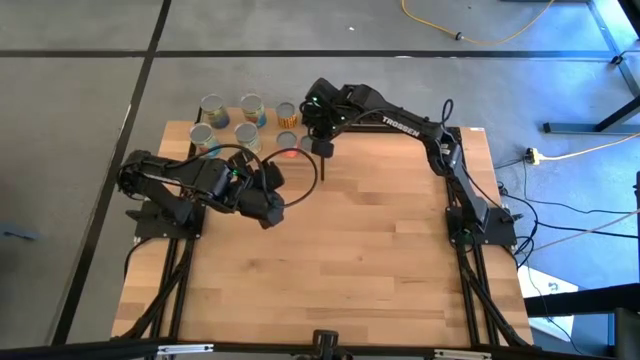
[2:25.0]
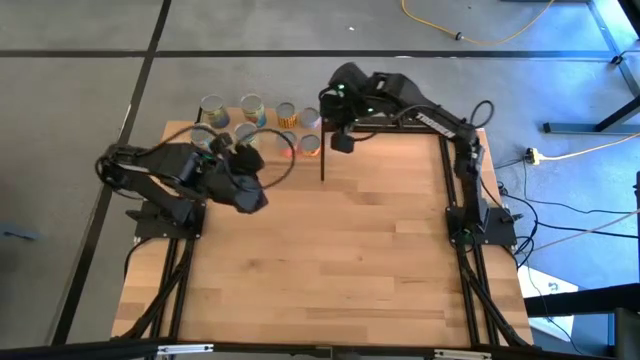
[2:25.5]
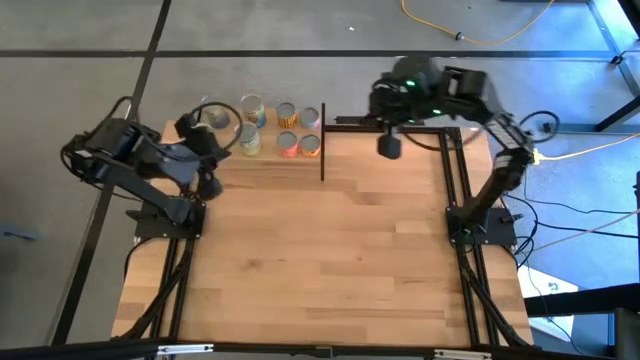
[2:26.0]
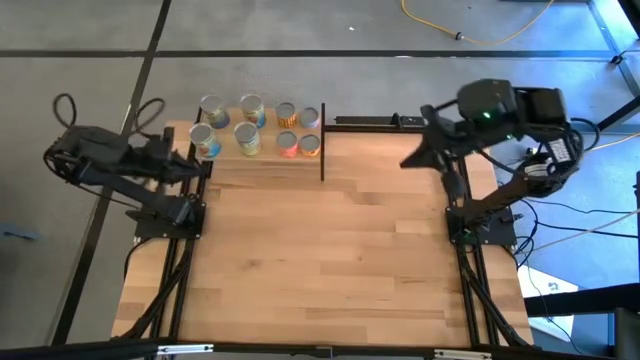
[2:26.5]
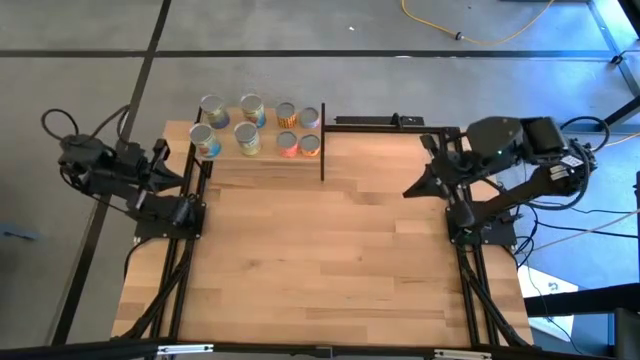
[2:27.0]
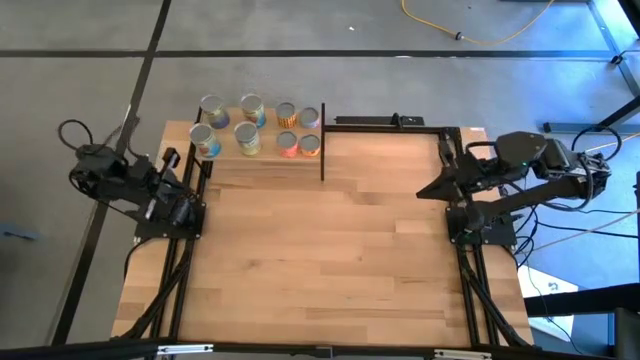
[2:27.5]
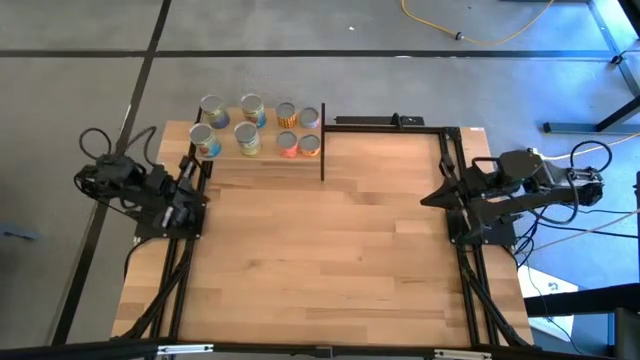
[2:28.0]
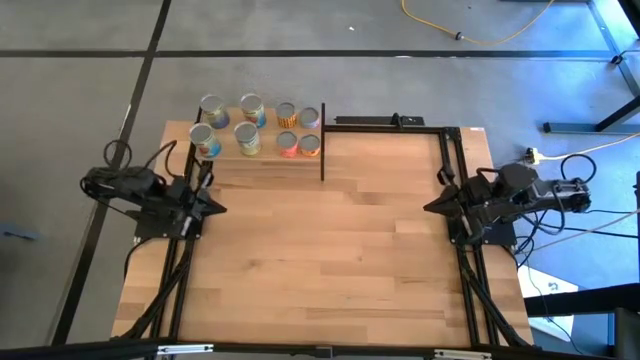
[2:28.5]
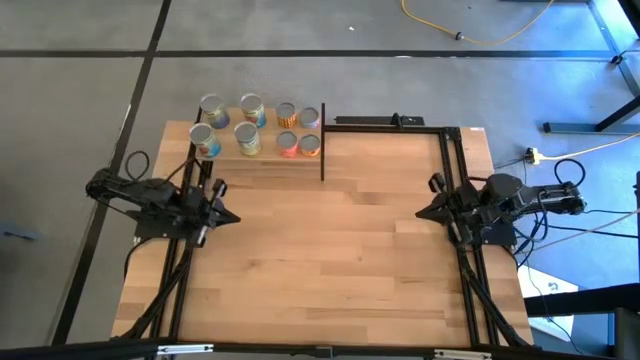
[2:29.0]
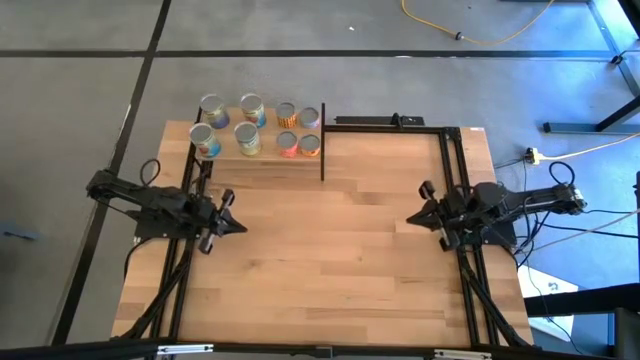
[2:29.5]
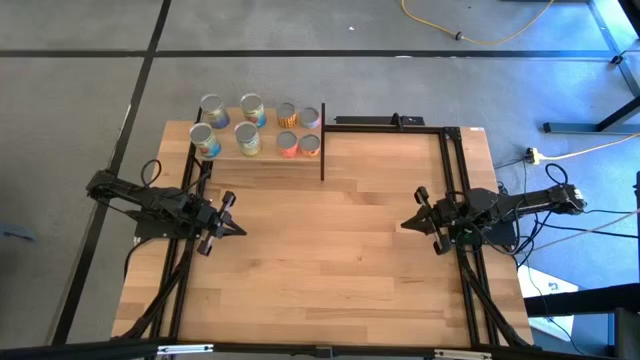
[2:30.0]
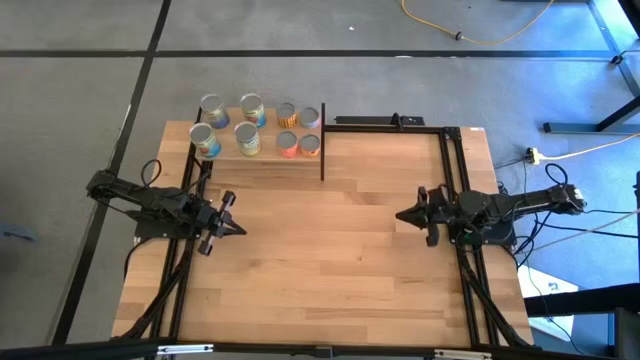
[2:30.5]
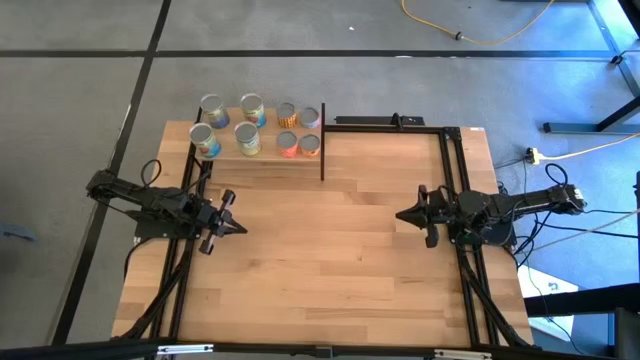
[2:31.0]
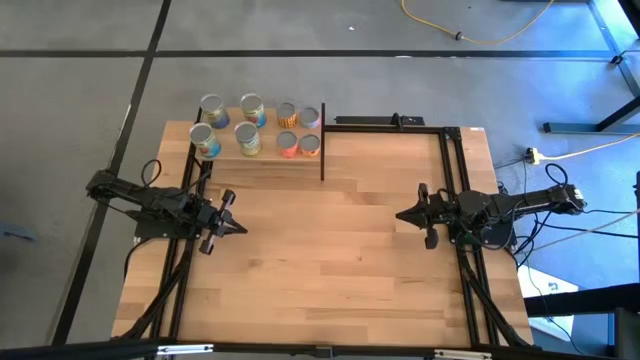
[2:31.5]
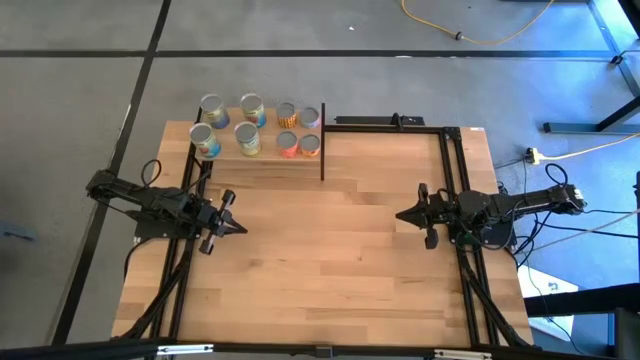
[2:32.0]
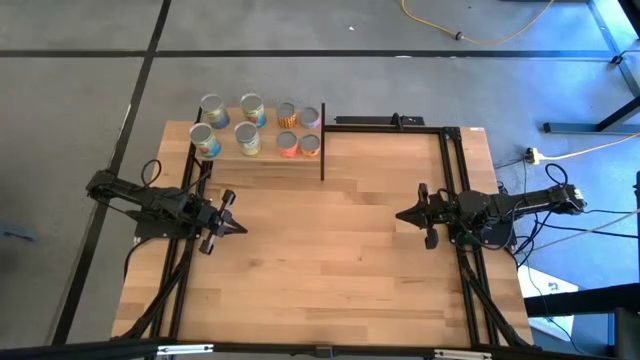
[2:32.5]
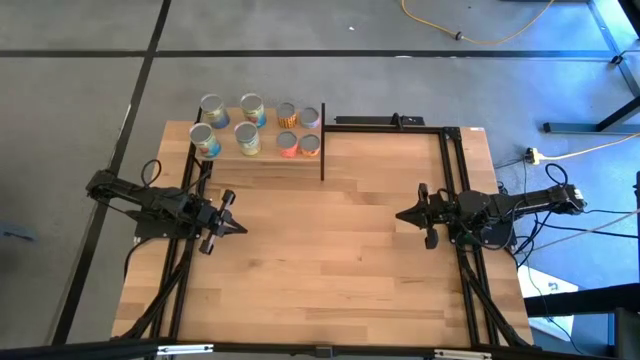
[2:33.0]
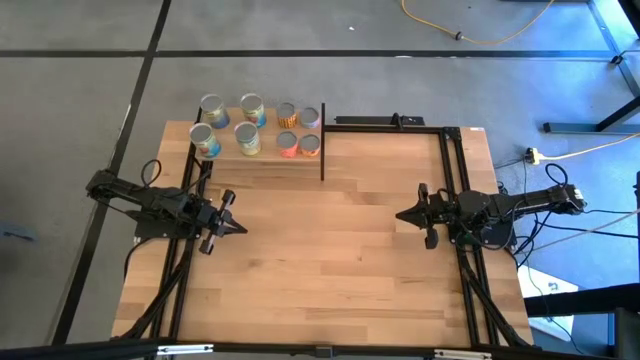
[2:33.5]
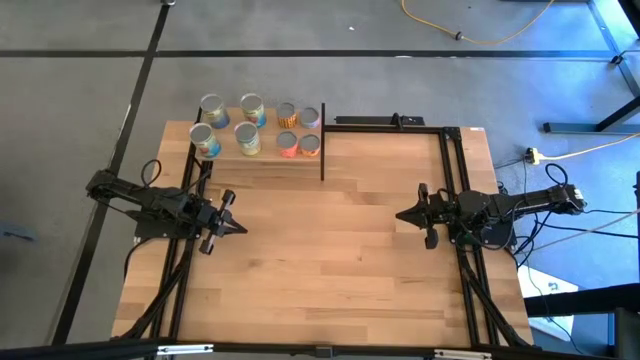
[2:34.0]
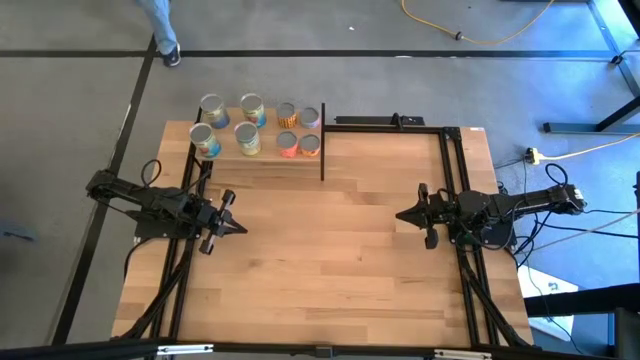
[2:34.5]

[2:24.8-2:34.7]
Task: Pick and place cans onto a shelf
Return to Home Position

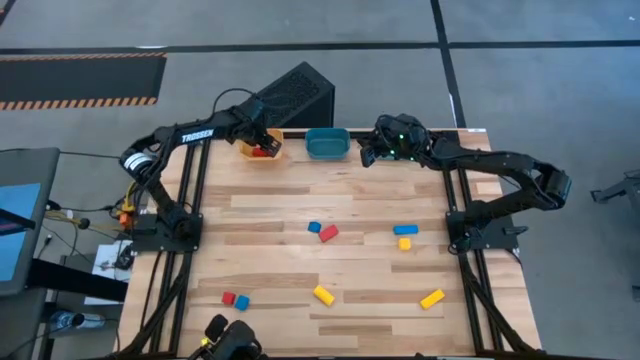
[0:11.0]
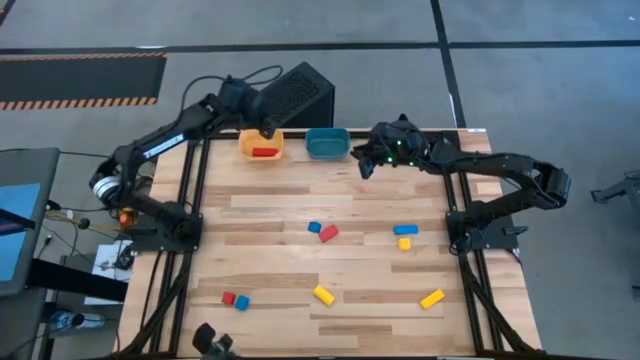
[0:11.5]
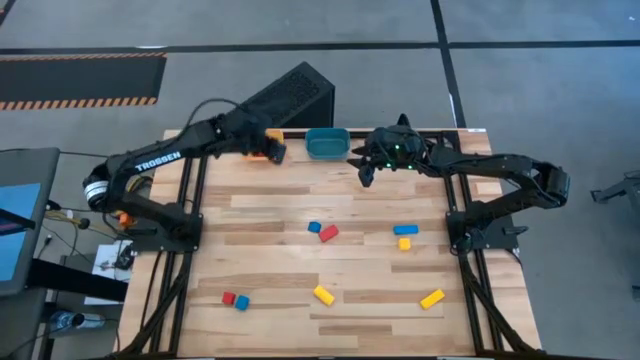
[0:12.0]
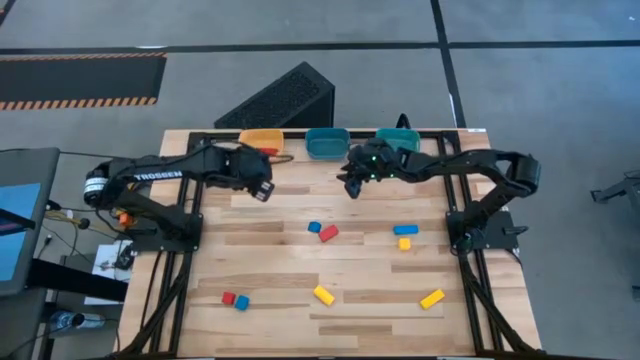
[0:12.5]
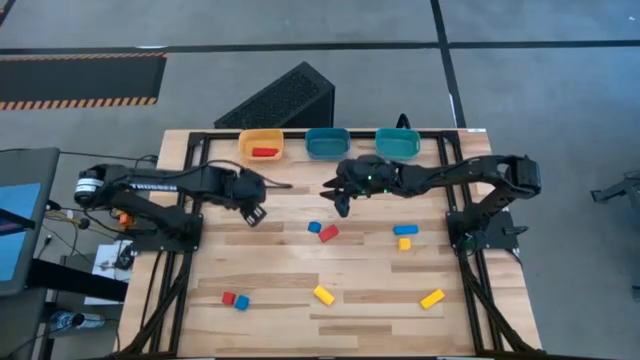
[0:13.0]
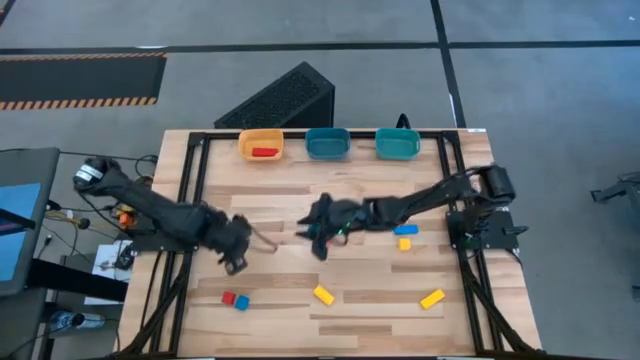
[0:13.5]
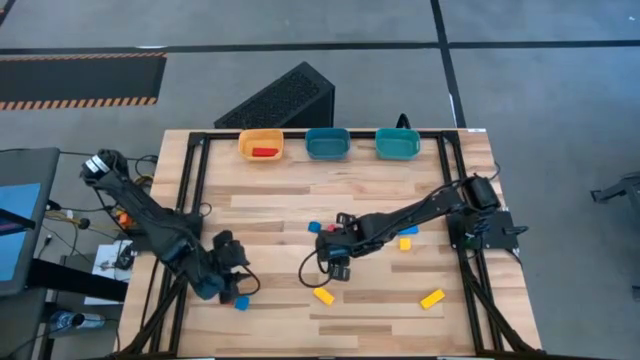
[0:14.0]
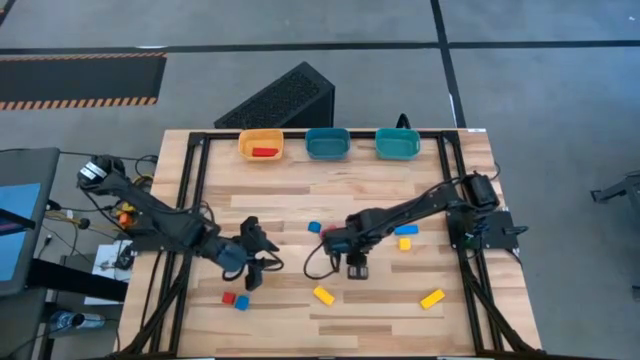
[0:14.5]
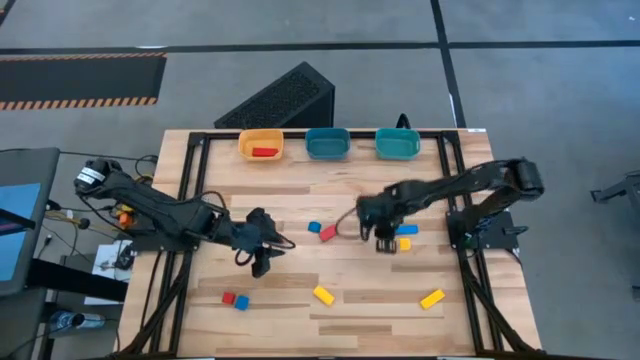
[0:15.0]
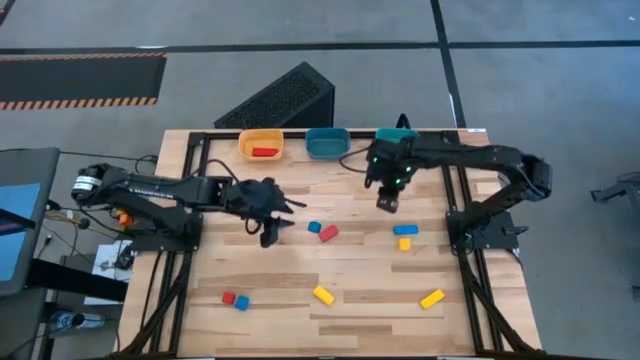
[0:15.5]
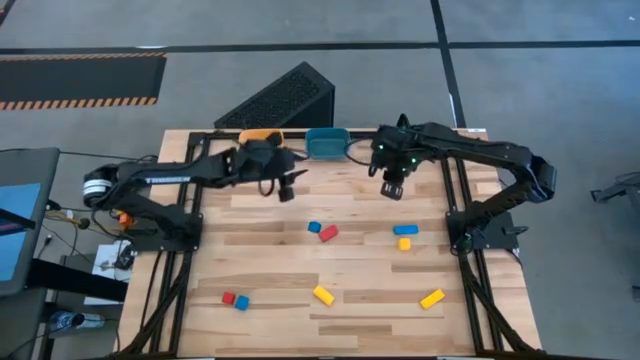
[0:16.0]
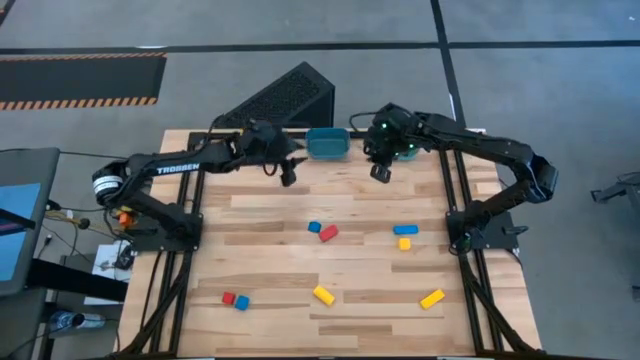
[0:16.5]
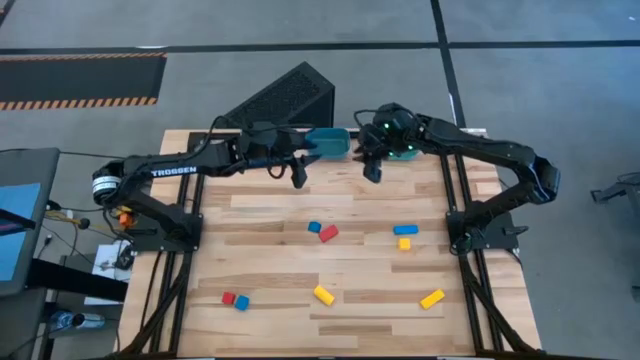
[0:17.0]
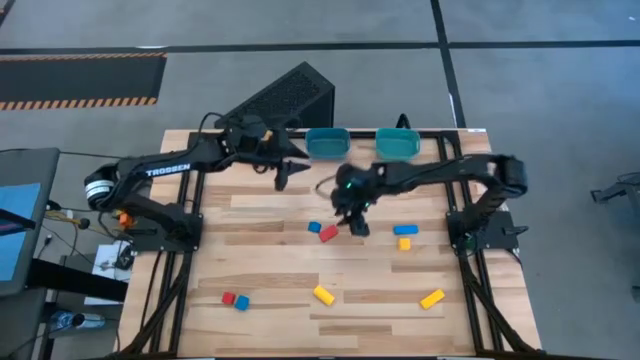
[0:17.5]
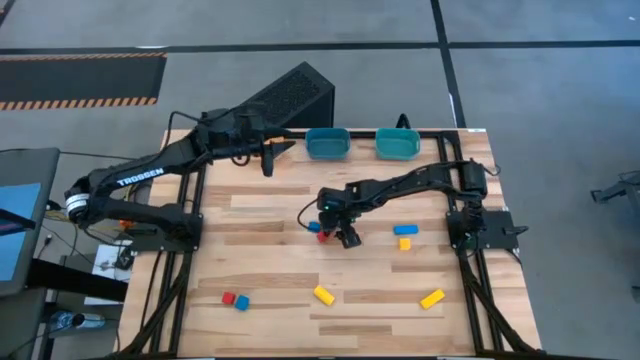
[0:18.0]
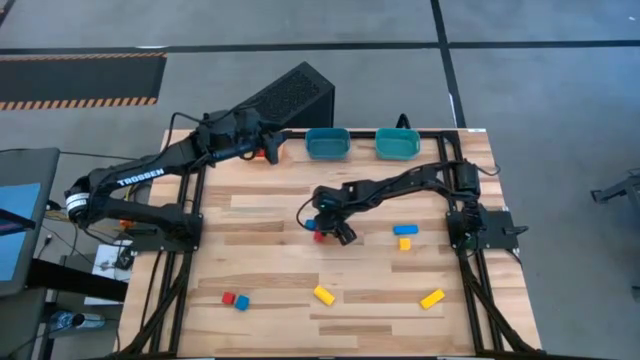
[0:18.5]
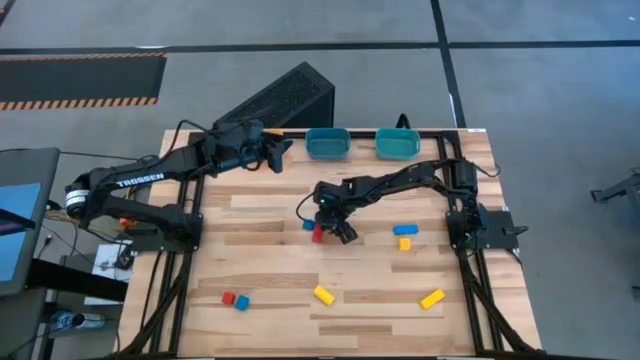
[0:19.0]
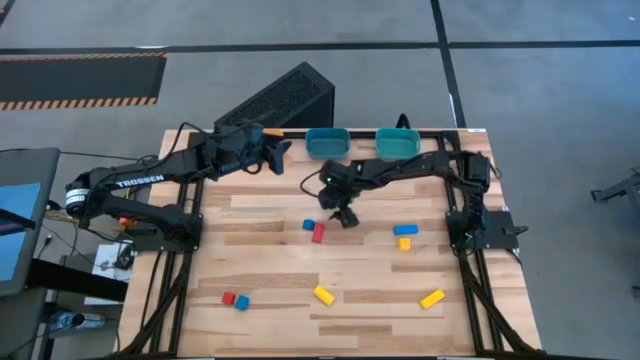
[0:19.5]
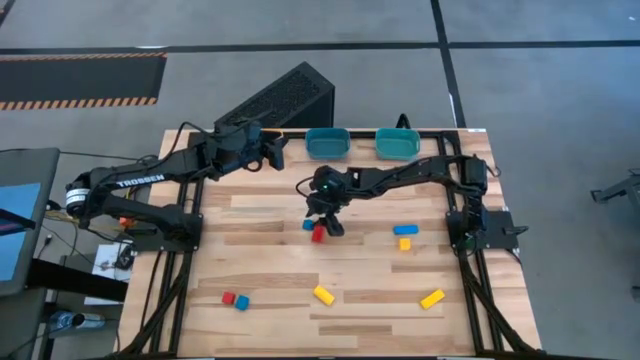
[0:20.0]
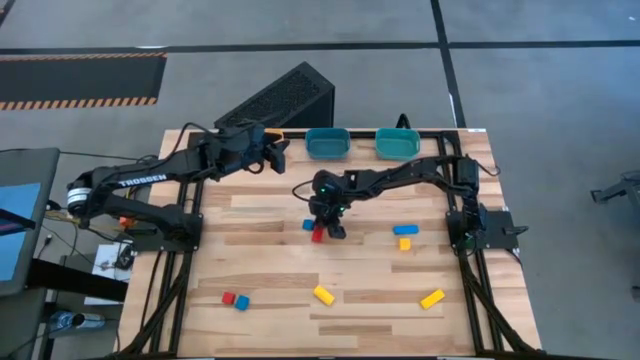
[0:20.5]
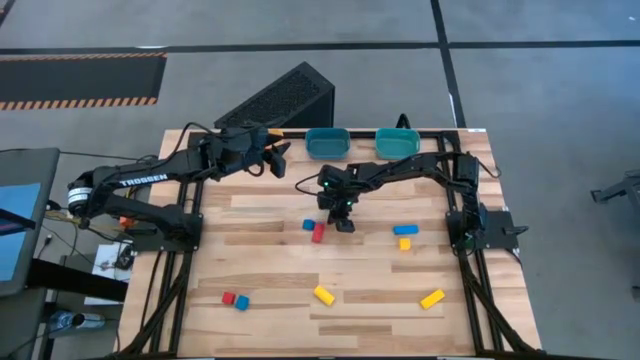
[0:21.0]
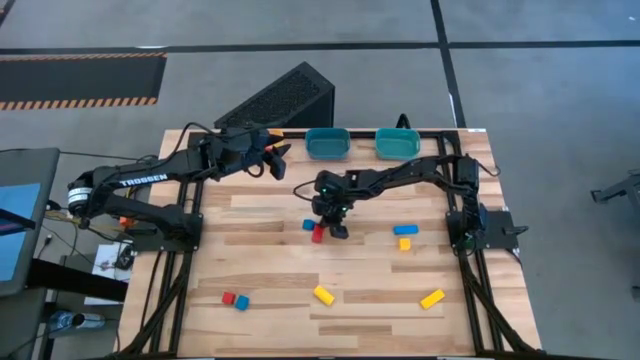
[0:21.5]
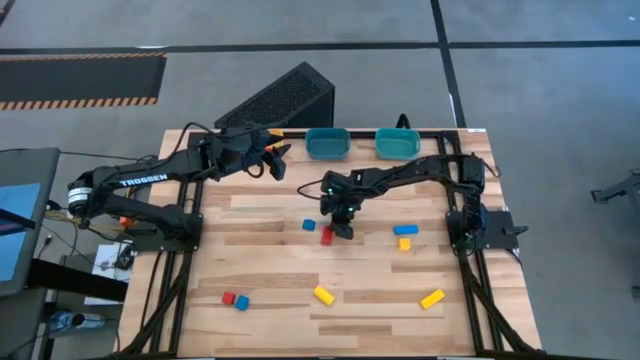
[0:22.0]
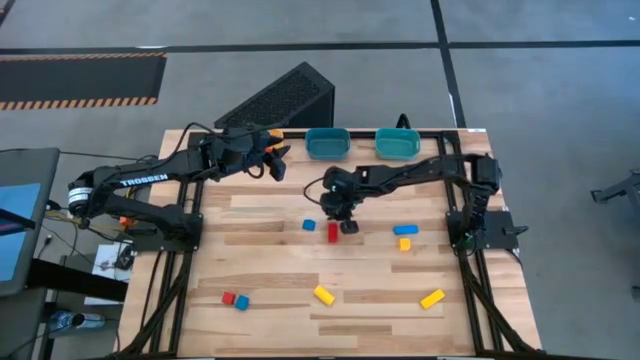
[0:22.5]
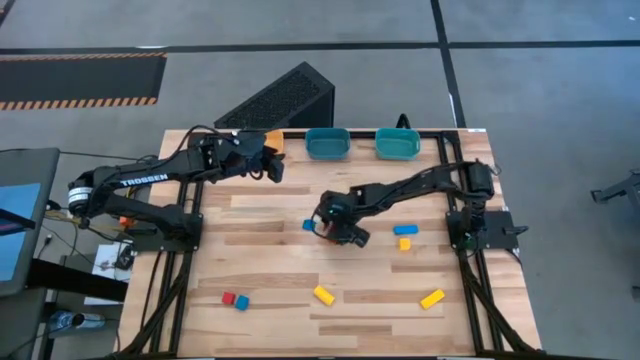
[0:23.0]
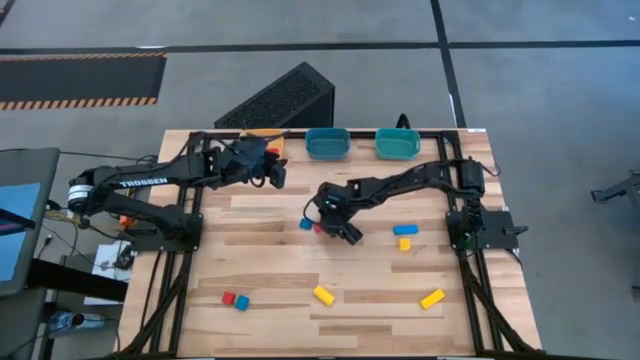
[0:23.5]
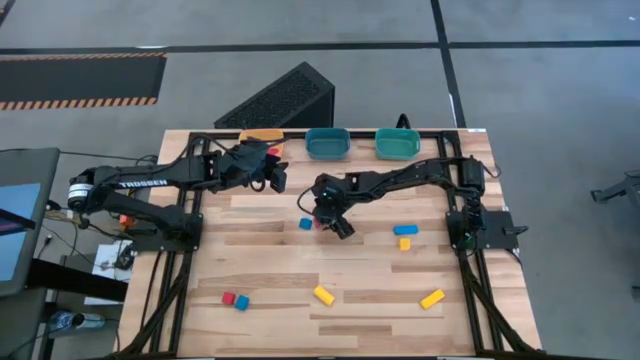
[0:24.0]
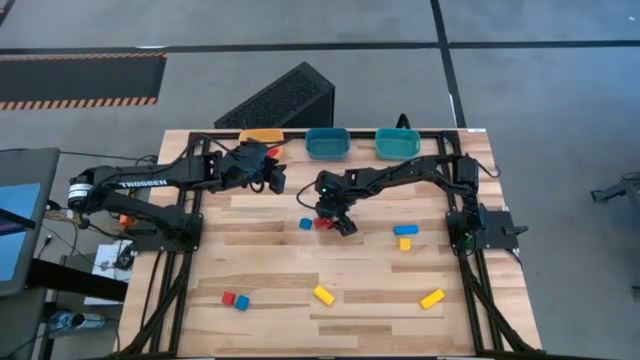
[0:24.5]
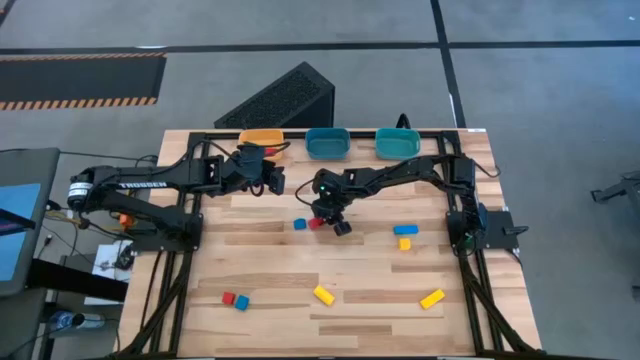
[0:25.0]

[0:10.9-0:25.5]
Task: Sort & place blocks by color
Put the right red block into the yellow container
